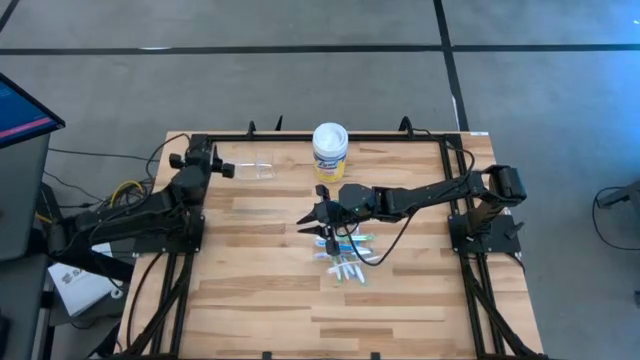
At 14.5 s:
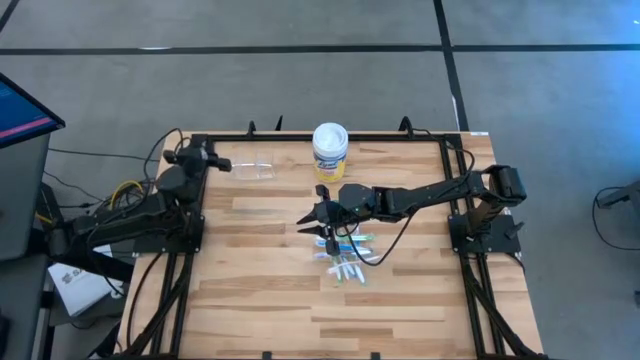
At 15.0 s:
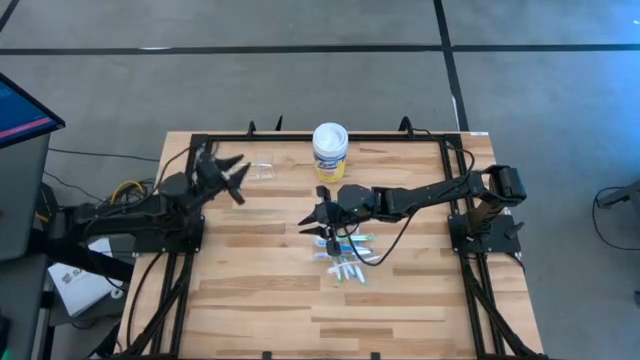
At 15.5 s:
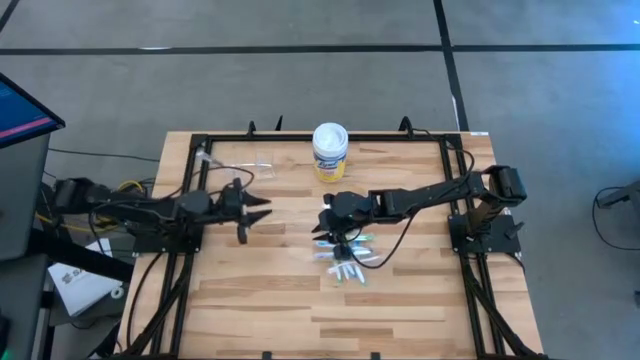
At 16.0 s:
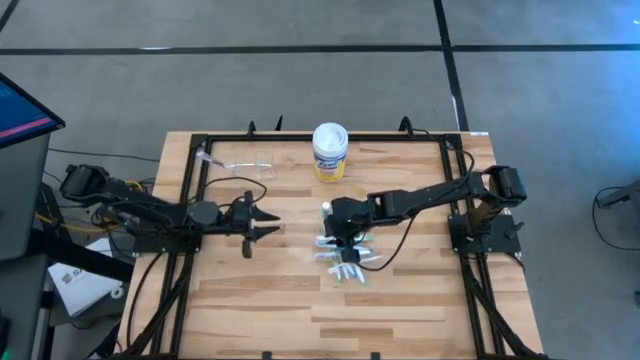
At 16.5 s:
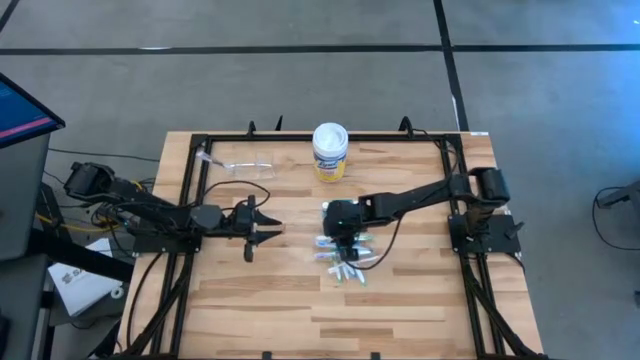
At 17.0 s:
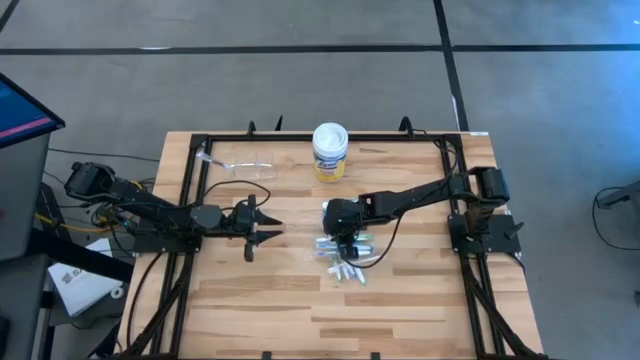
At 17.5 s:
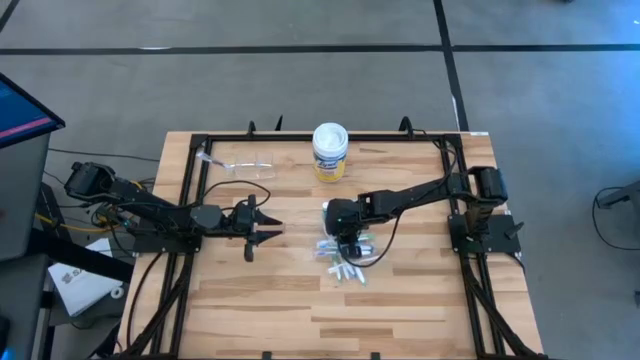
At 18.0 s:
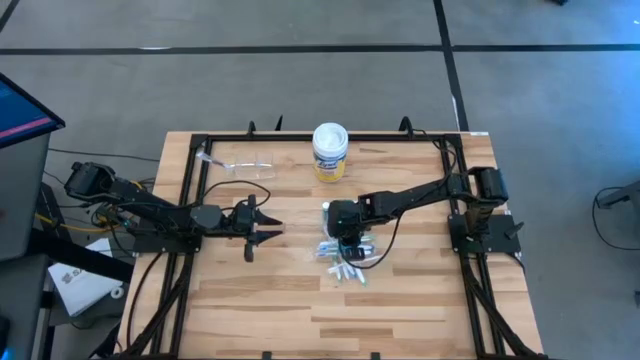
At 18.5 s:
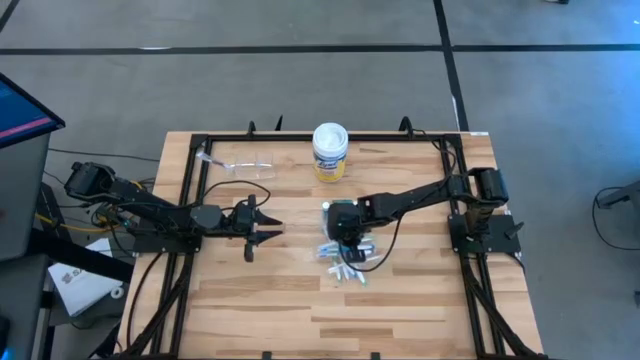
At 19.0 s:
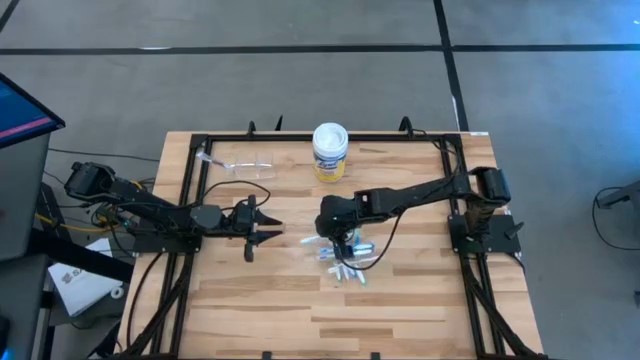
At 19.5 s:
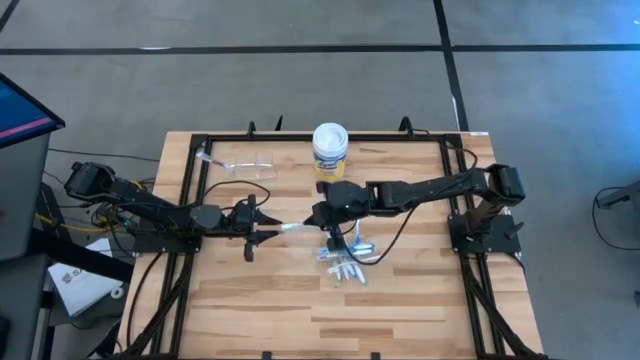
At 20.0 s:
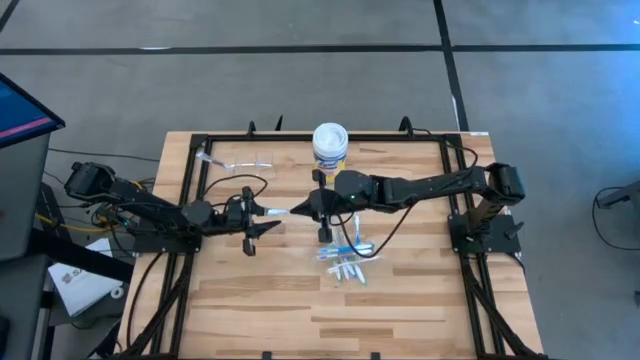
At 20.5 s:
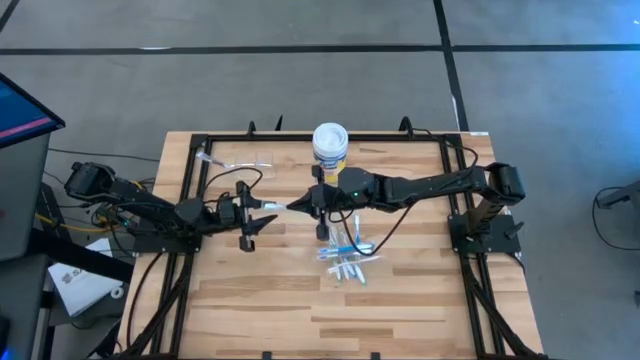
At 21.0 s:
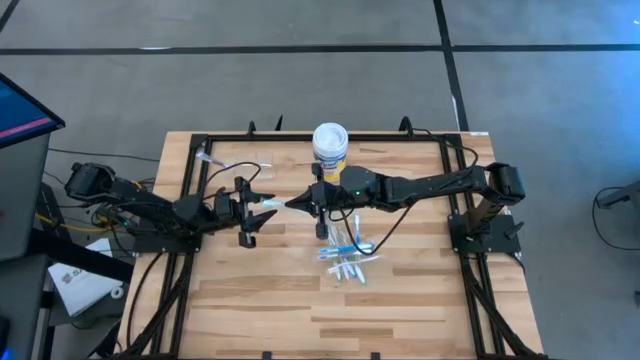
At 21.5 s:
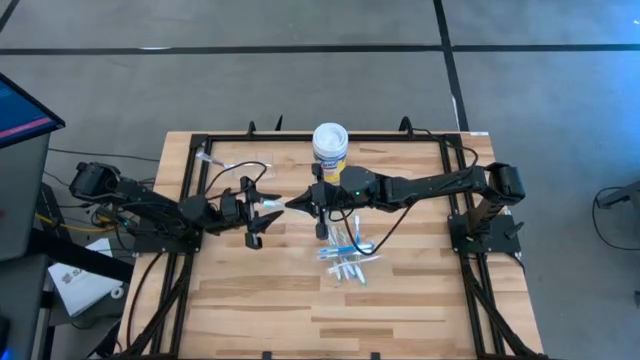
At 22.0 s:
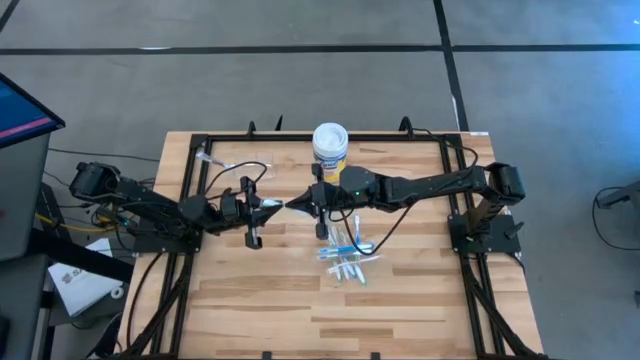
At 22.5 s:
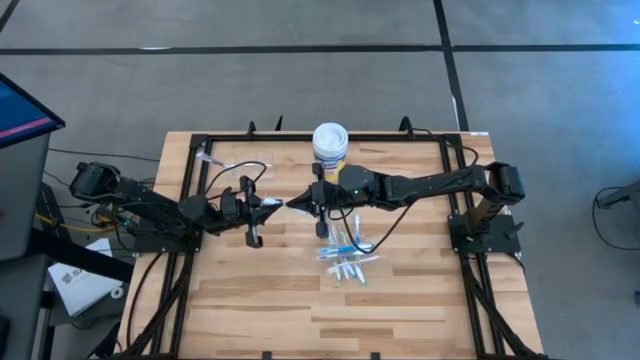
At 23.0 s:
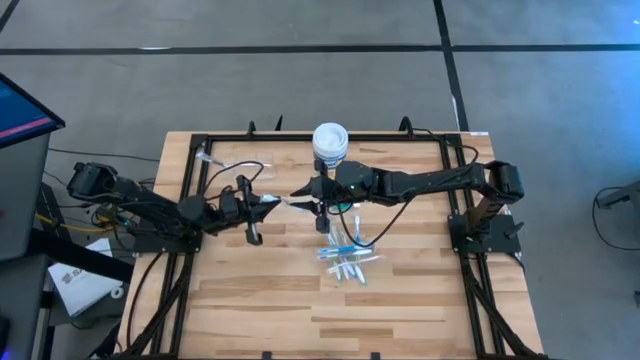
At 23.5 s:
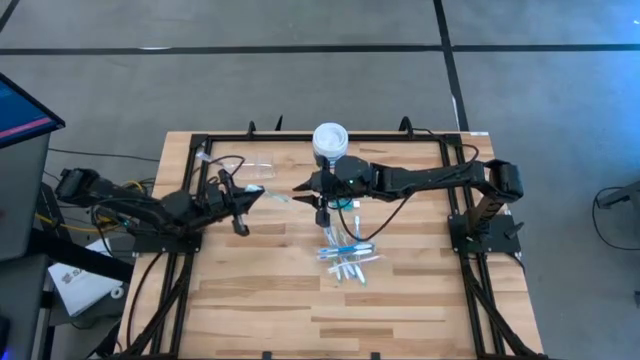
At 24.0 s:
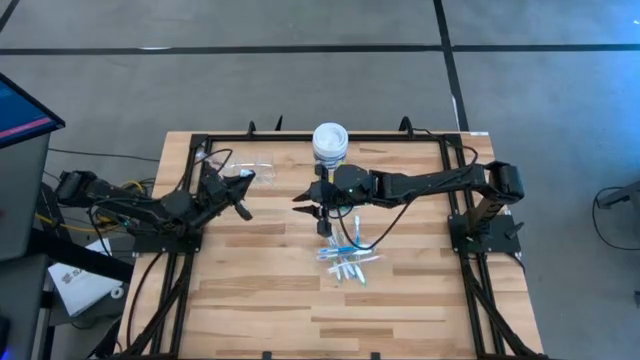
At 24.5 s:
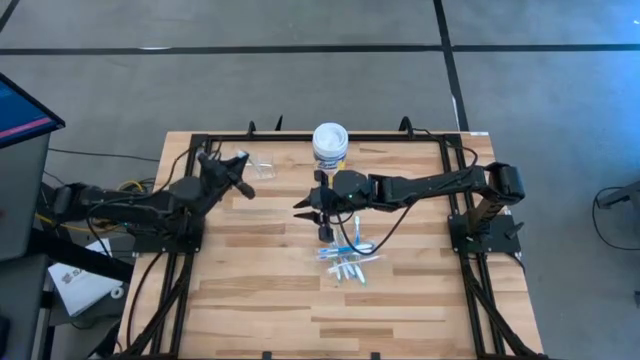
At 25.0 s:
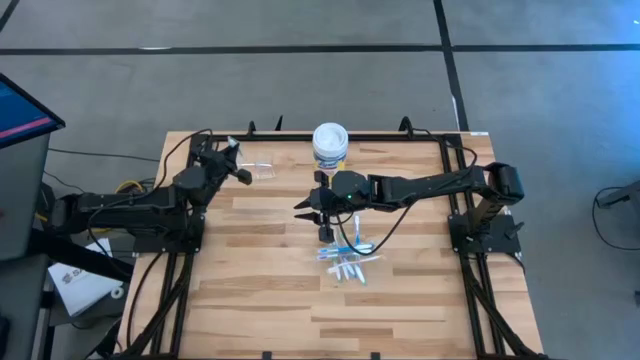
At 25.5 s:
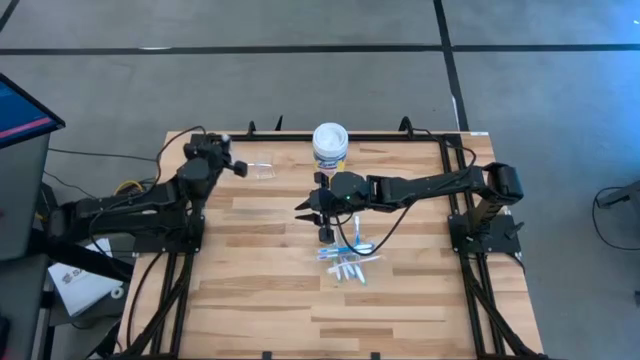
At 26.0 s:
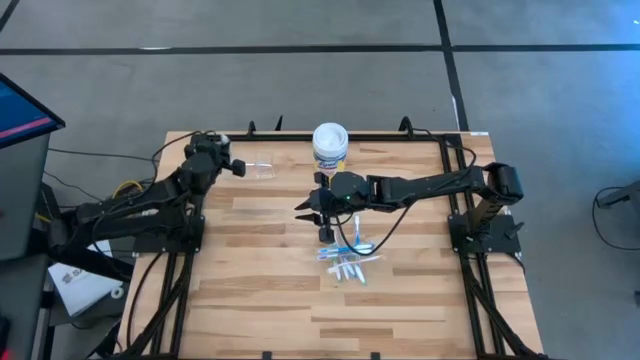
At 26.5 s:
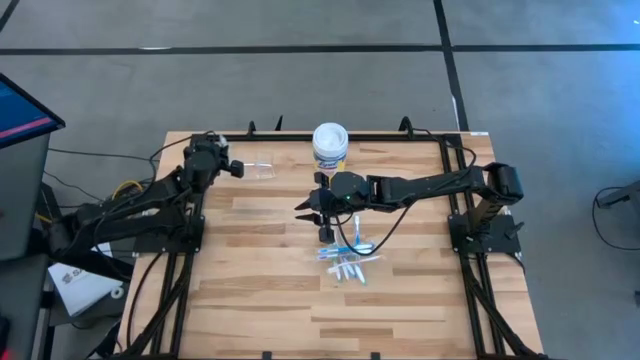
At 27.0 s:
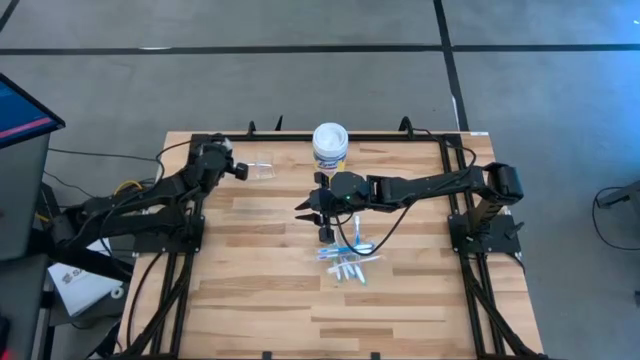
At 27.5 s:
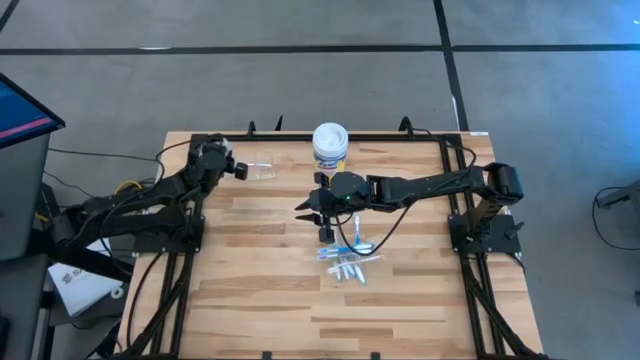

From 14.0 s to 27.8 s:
Task: Pick & Place toothbrushing station
Put the green toothbrush into the transparent organizer

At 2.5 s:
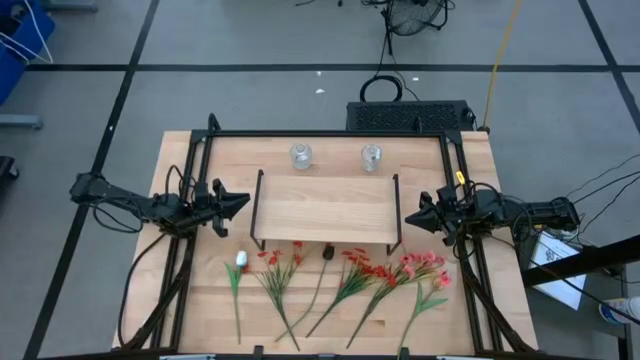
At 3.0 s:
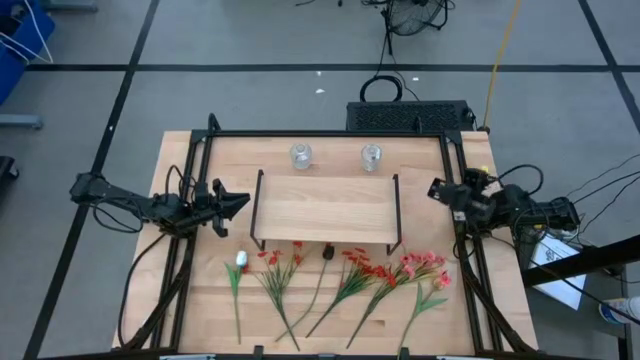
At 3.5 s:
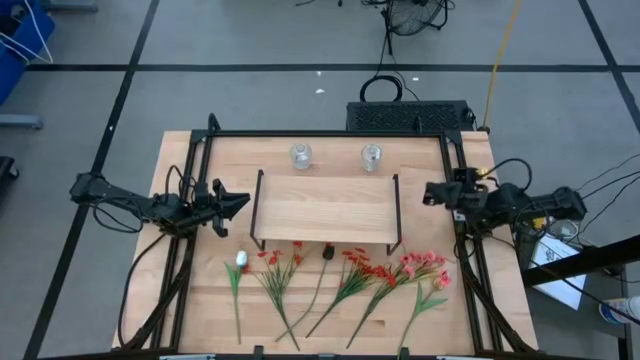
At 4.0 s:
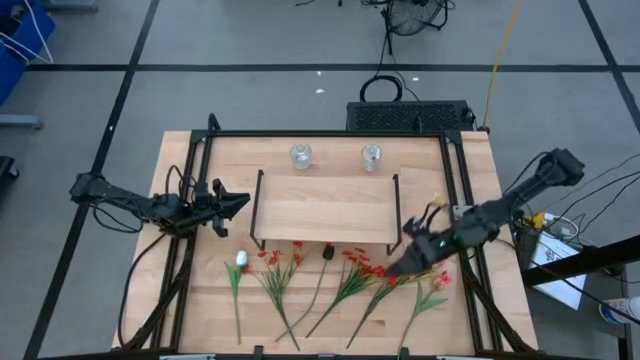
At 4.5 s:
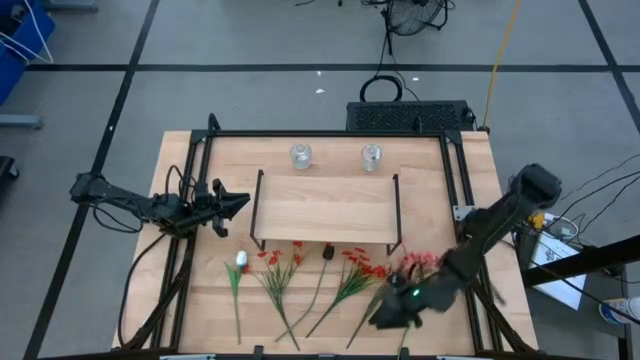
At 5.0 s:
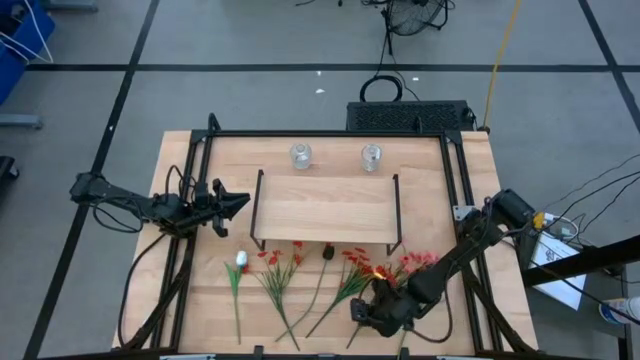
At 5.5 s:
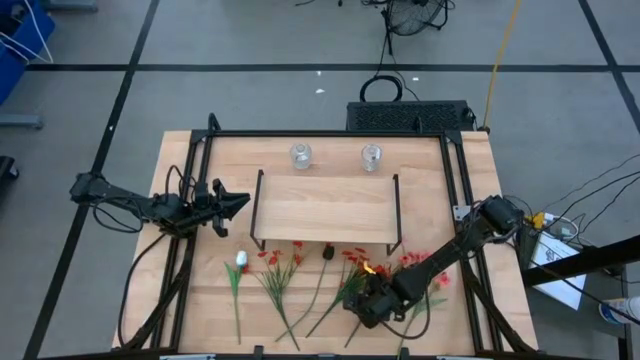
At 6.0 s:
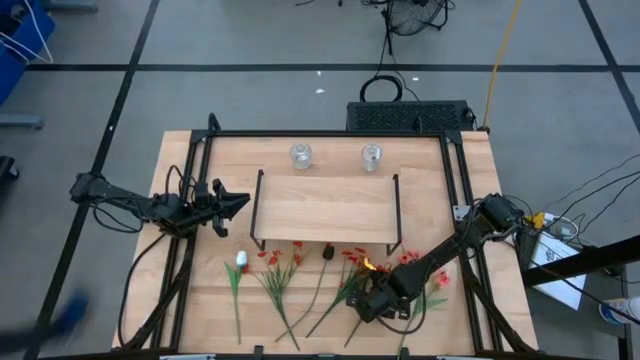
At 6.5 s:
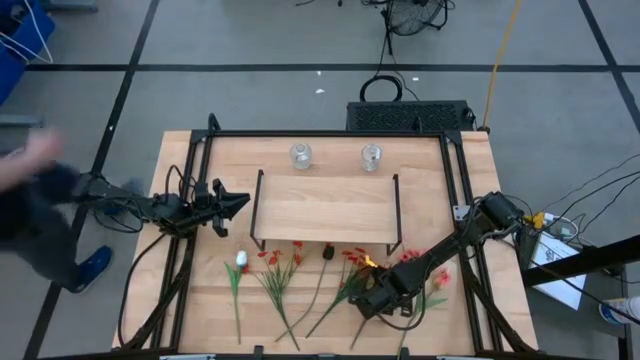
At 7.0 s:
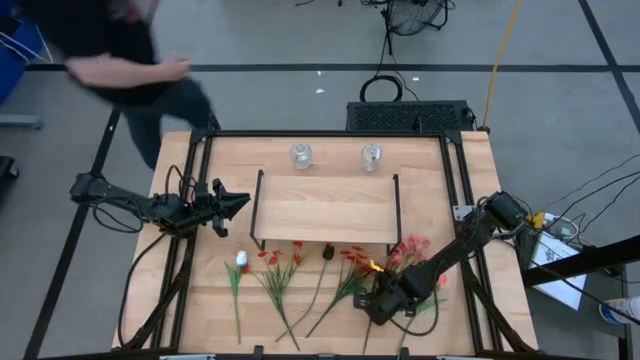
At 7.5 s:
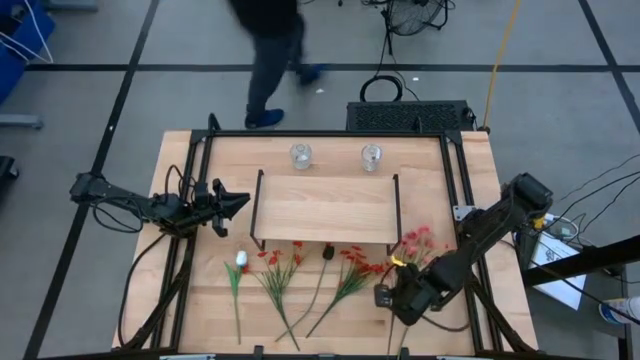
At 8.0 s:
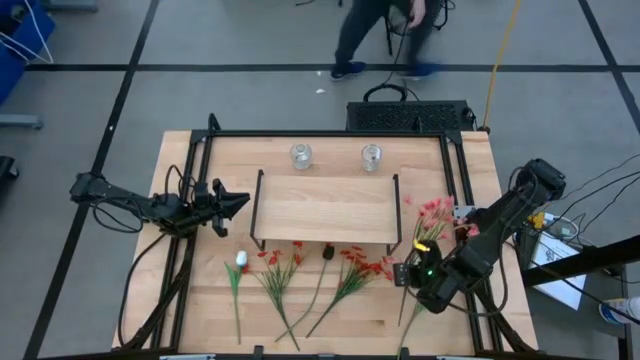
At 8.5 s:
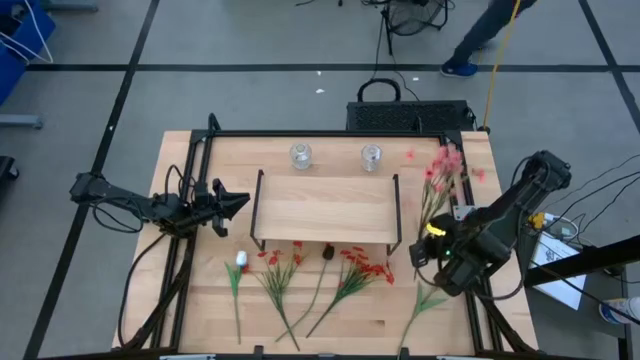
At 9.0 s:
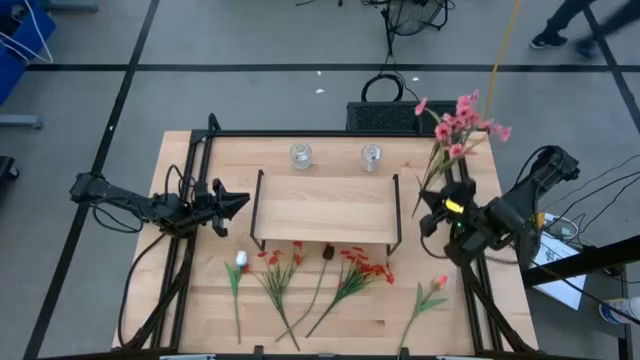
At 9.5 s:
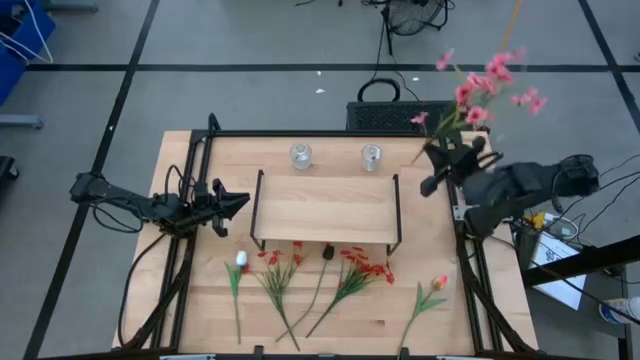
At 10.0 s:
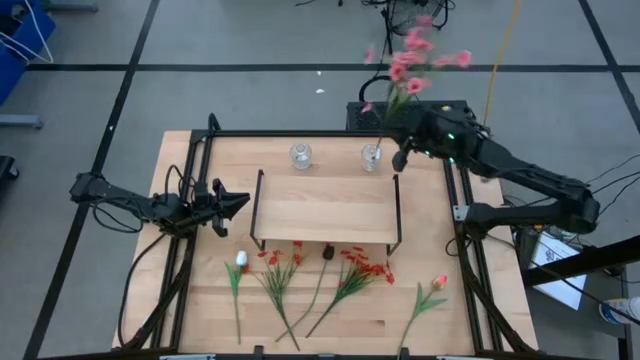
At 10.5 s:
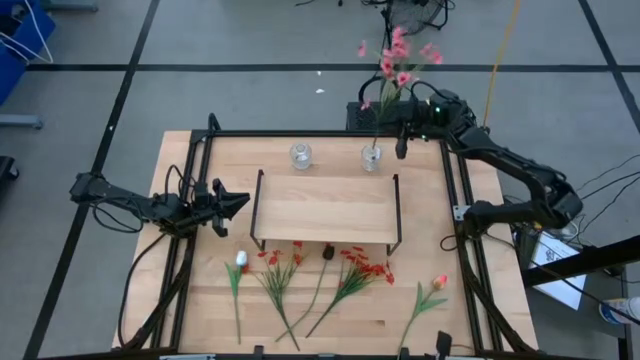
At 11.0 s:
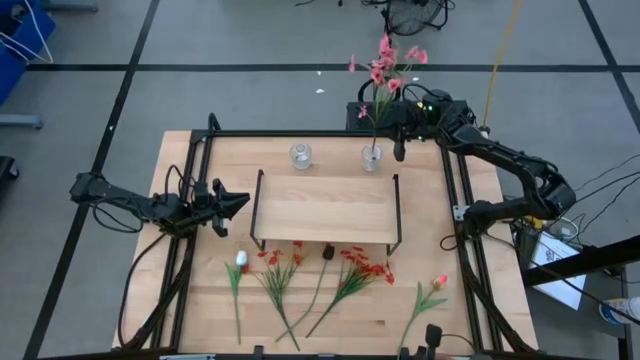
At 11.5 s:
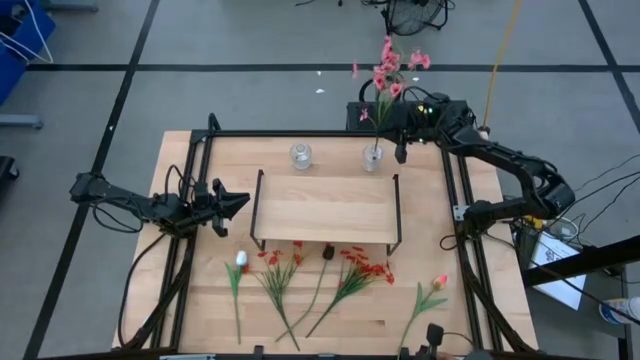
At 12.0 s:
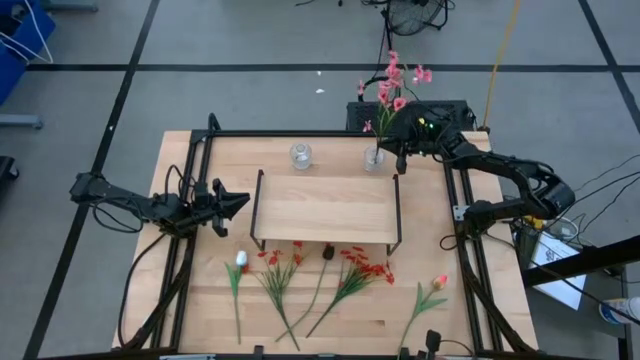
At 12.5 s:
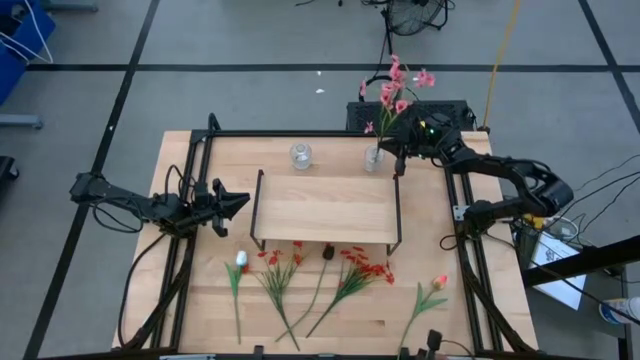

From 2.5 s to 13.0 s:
Task: Pick and place flowers into a vace then onto a shelf
Put the pink flowers into the right transparent flower vase
